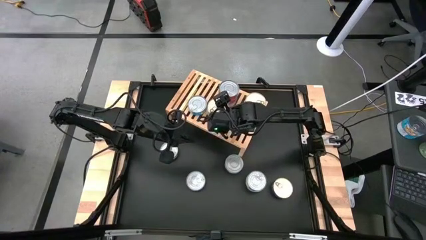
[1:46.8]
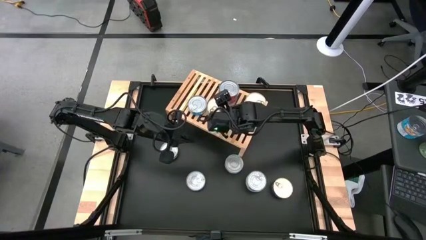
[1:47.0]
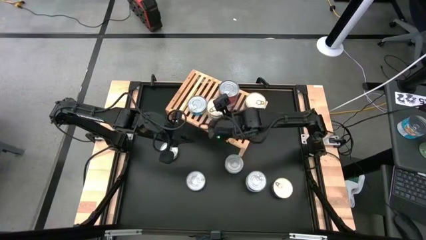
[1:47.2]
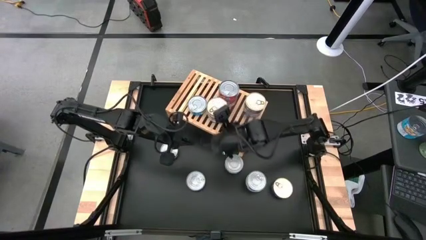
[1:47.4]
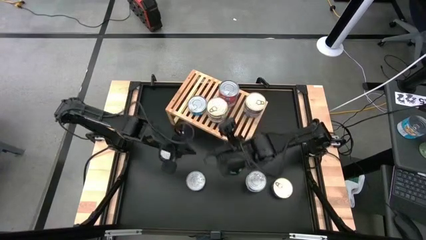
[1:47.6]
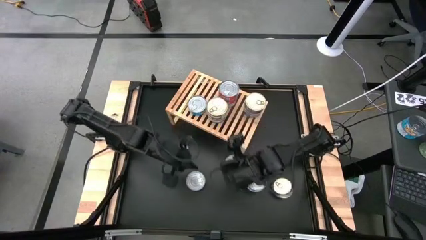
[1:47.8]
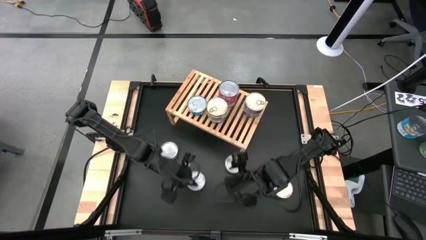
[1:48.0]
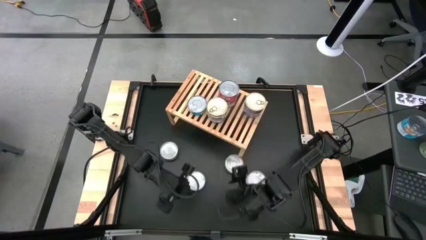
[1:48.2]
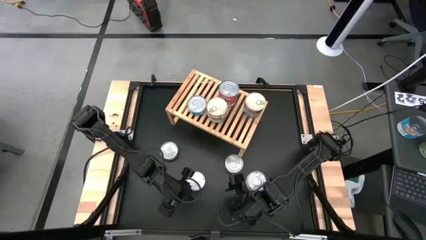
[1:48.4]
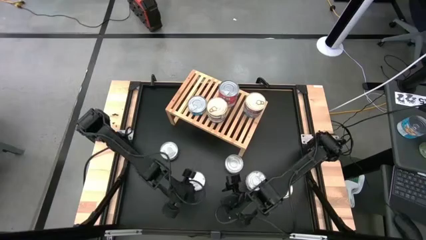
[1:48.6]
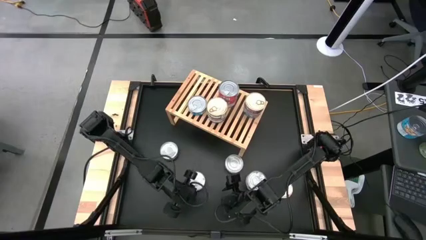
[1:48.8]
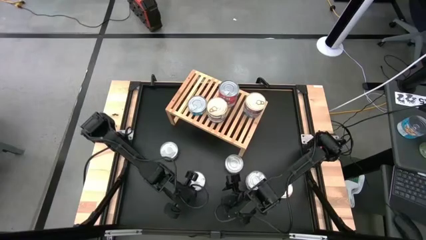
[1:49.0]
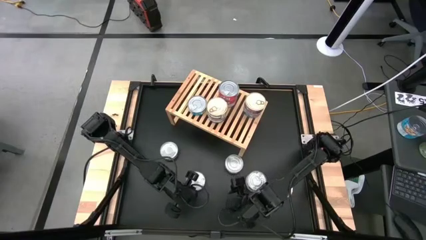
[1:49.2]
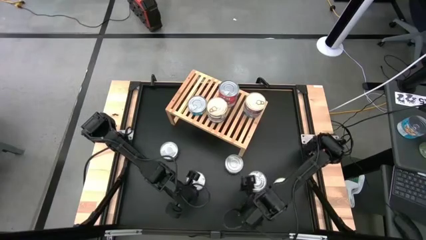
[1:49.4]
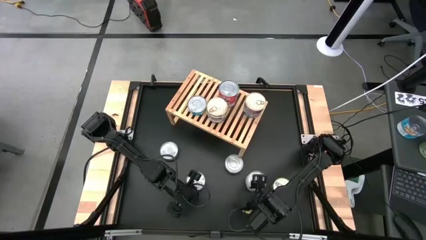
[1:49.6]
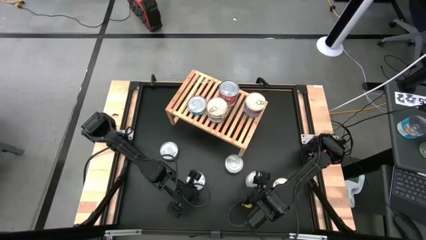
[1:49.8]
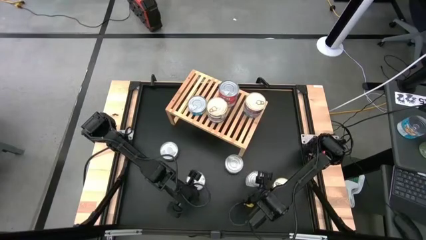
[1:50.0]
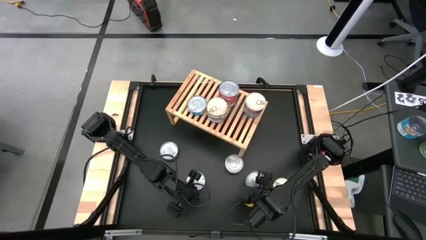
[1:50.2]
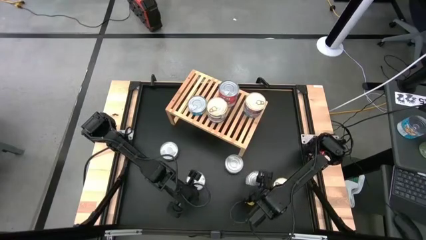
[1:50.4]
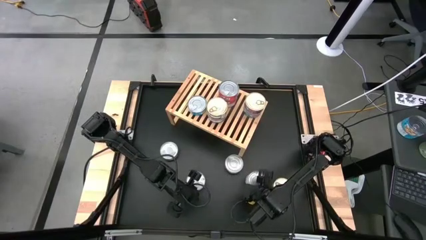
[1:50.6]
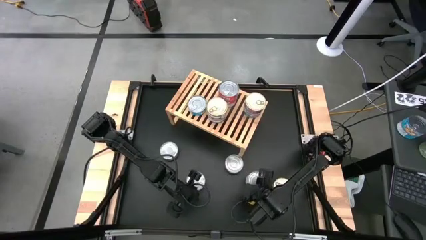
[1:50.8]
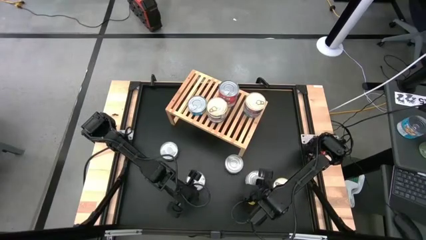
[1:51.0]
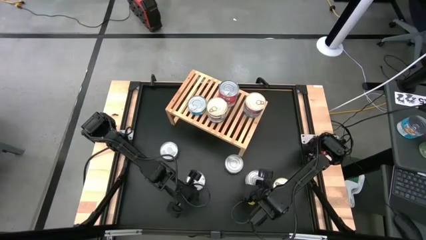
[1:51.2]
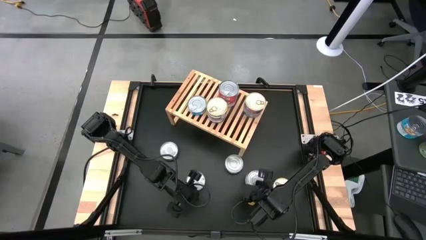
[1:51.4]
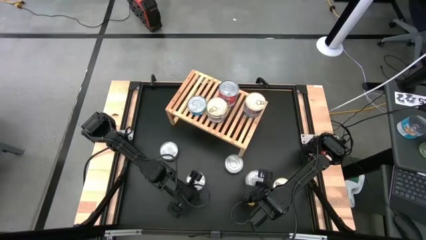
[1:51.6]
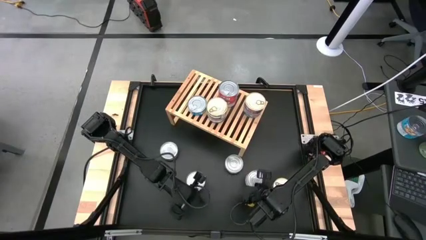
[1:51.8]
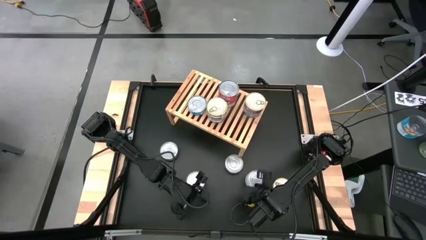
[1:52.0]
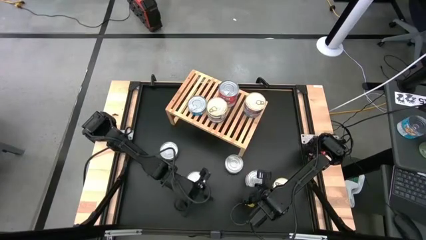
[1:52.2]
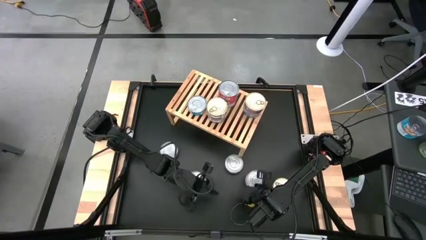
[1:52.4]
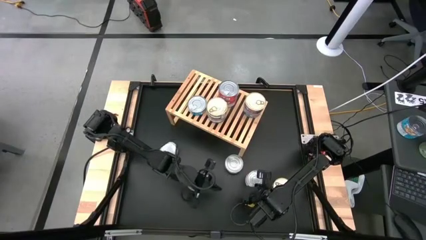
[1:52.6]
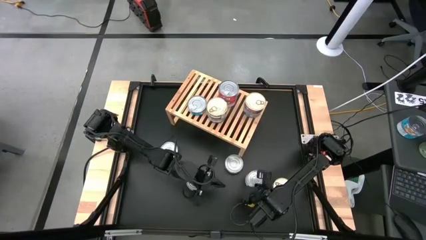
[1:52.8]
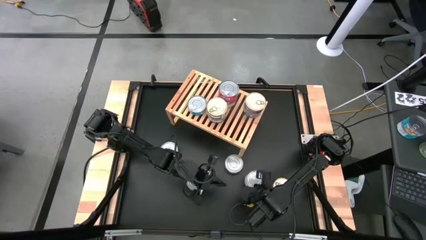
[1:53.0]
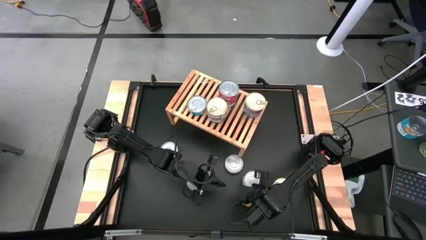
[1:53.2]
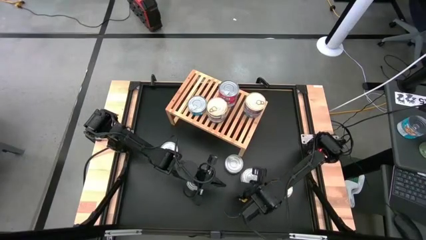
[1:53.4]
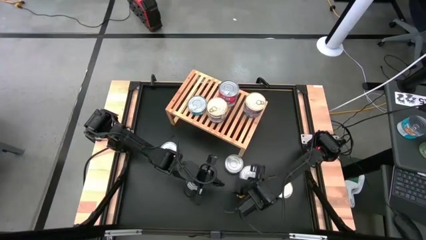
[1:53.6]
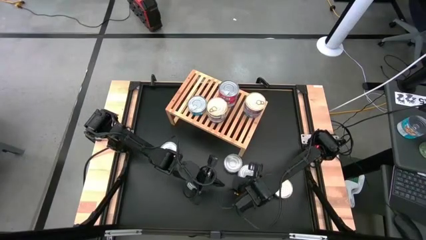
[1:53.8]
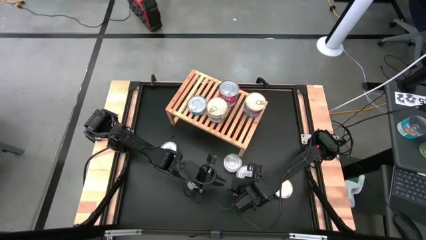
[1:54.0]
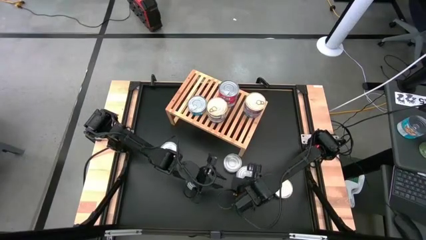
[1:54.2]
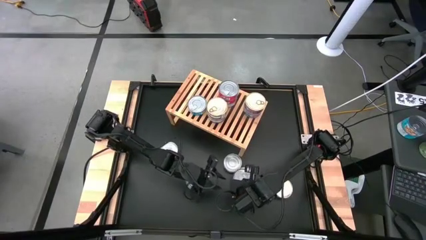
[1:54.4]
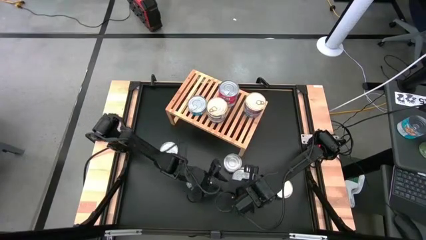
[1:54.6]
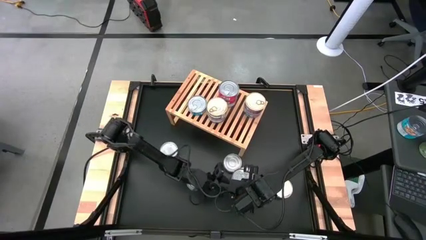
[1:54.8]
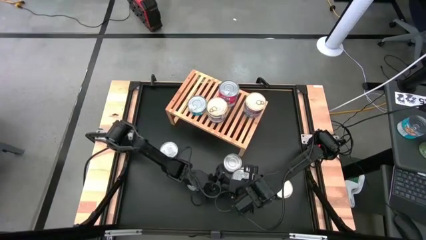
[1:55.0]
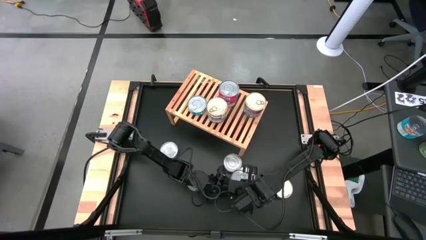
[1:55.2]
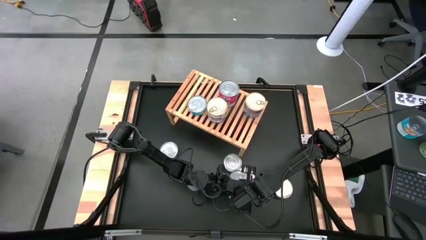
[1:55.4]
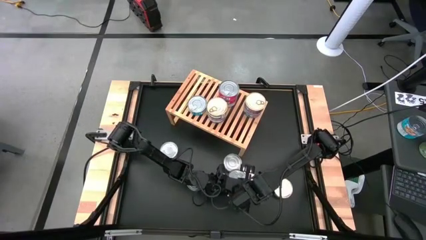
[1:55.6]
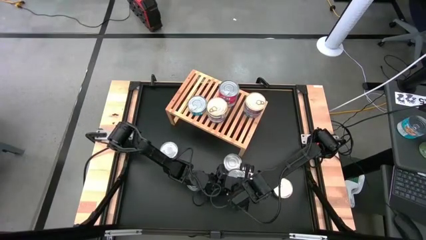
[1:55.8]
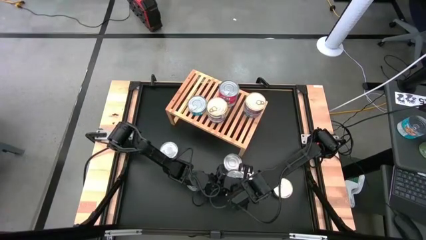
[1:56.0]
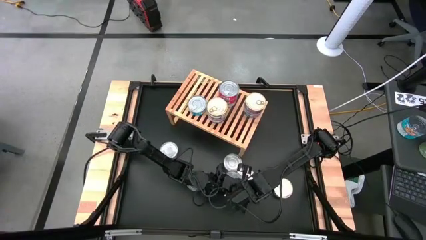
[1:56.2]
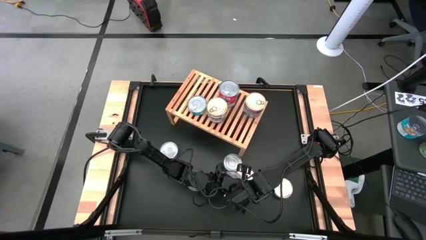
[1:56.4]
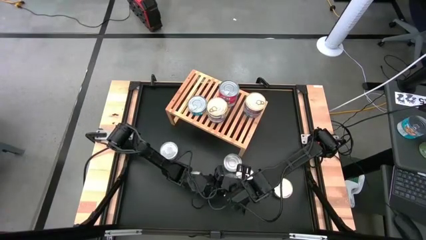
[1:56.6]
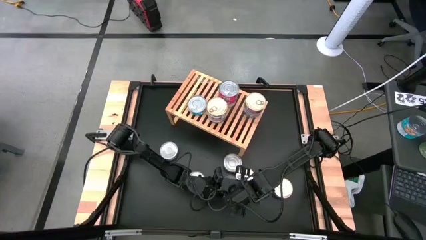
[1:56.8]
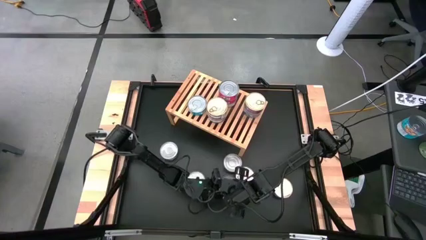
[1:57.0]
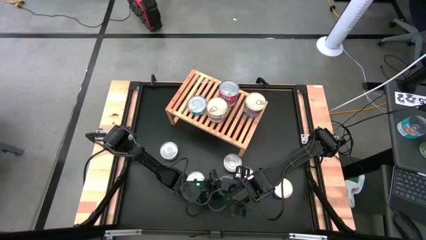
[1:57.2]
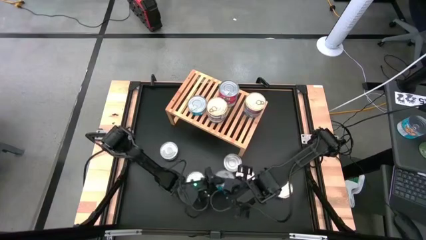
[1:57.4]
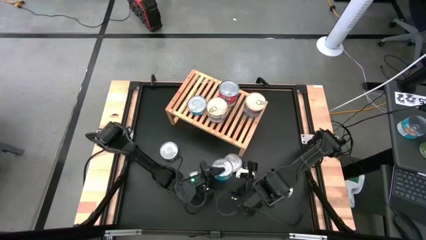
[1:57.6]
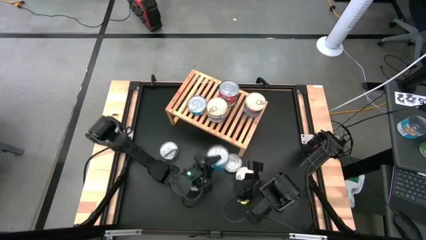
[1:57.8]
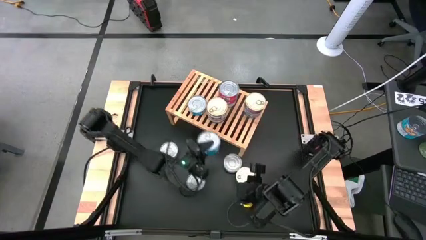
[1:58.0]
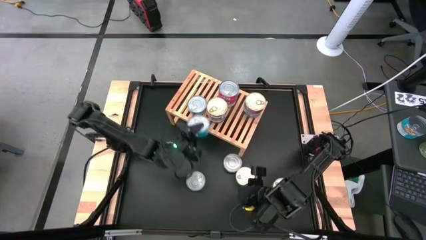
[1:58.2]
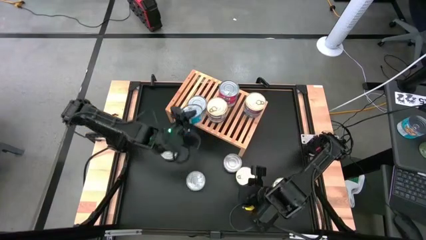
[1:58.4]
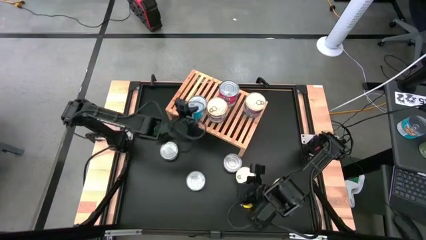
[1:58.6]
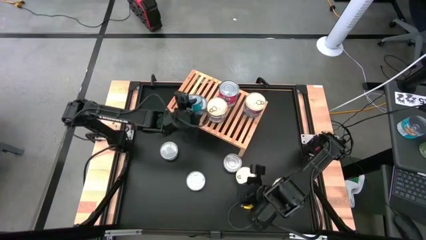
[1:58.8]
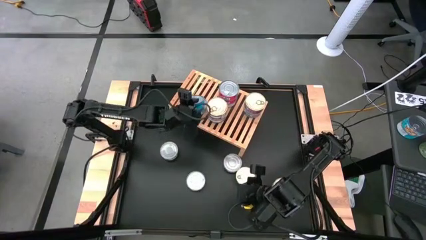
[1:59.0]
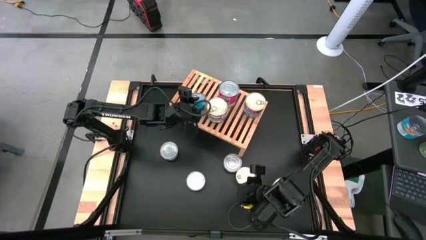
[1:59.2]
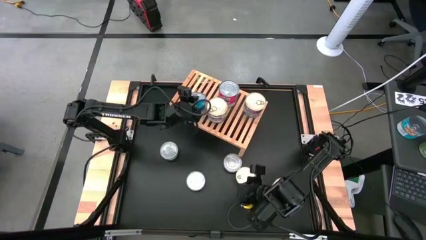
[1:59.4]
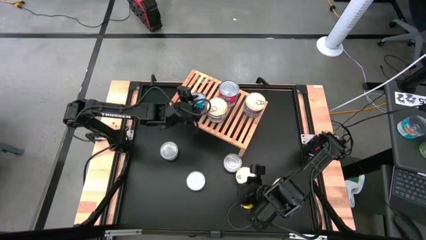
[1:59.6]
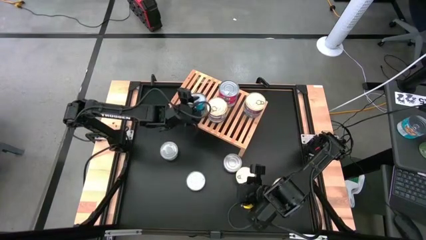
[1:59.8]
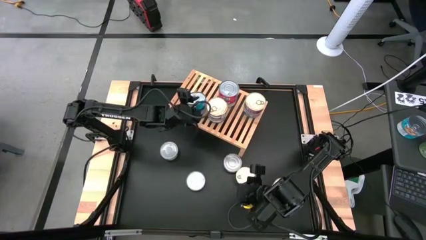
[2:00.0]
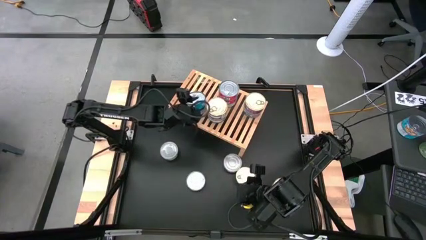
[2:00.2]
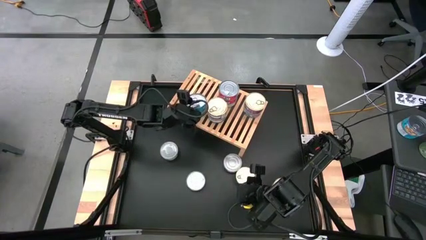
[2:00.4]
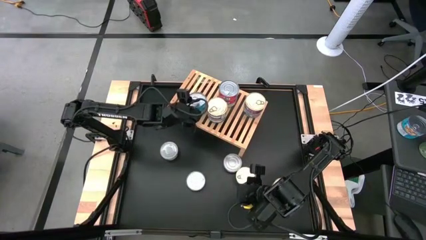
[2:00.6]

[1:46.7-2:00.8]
Task: Stack canned seafood by type on shelf
Stack the yellow and blue tuna can on top of the yellow and blue tuna can on the shelf

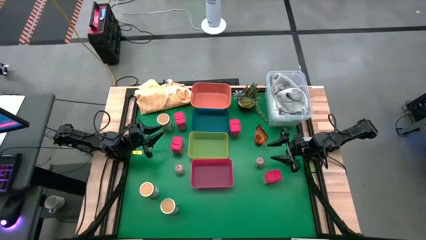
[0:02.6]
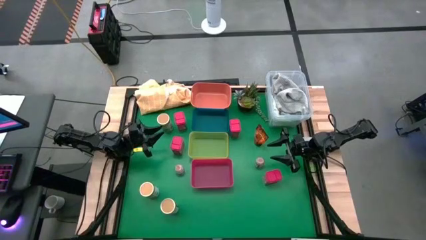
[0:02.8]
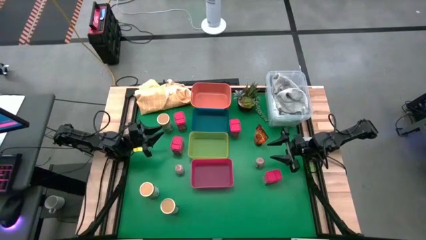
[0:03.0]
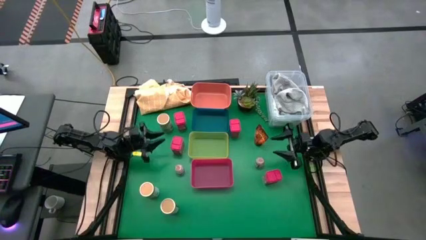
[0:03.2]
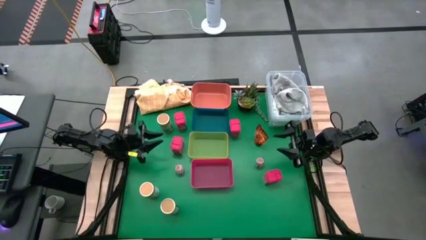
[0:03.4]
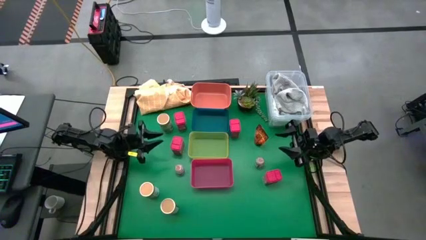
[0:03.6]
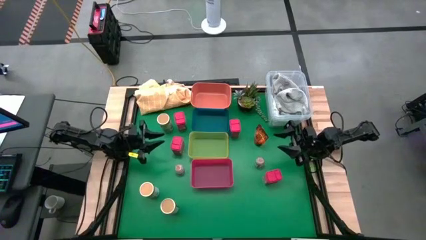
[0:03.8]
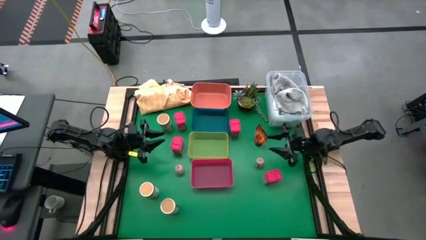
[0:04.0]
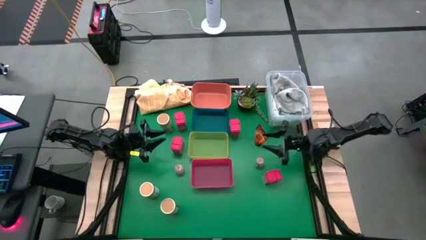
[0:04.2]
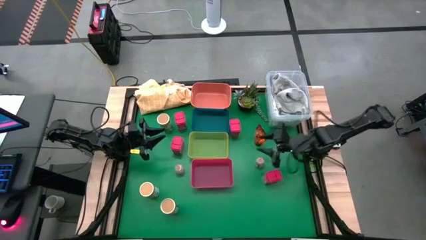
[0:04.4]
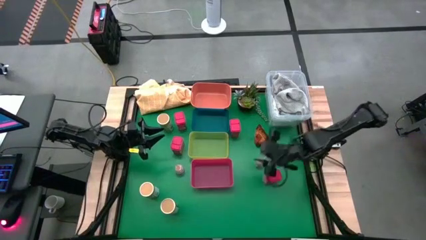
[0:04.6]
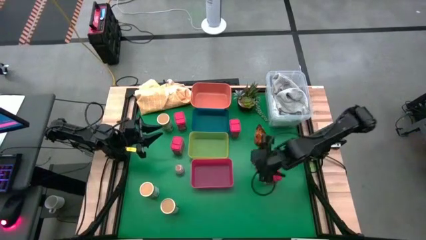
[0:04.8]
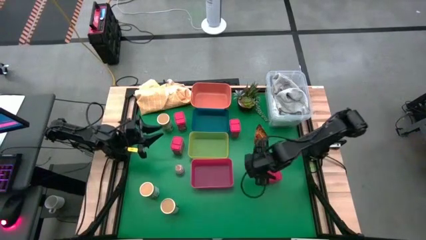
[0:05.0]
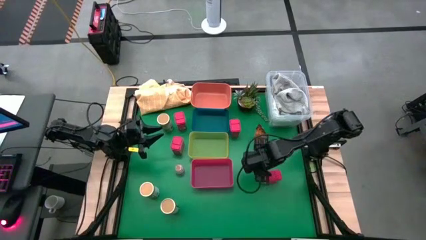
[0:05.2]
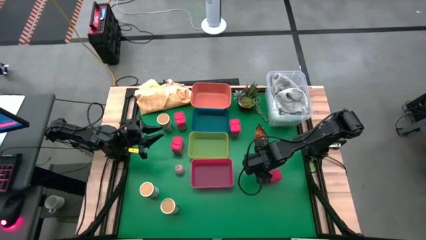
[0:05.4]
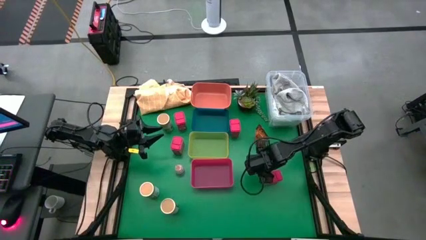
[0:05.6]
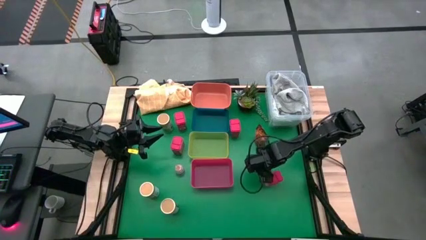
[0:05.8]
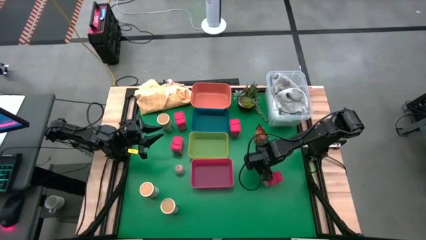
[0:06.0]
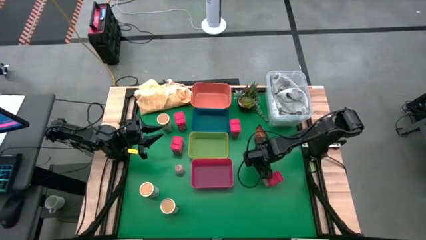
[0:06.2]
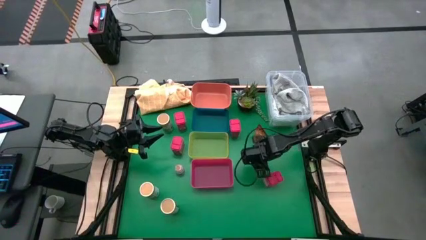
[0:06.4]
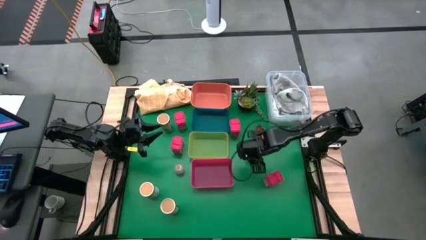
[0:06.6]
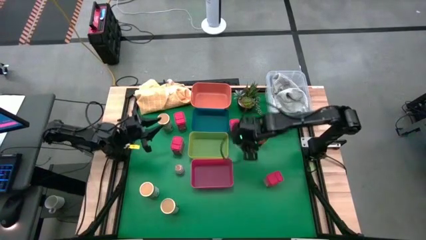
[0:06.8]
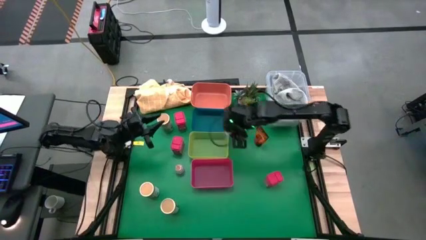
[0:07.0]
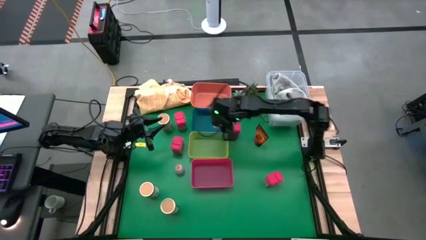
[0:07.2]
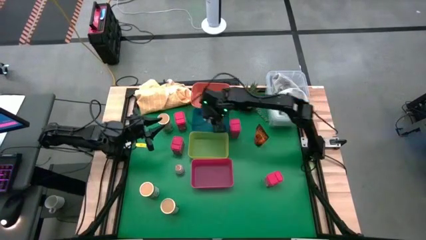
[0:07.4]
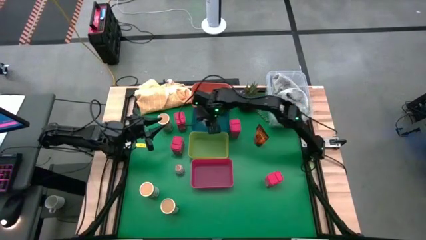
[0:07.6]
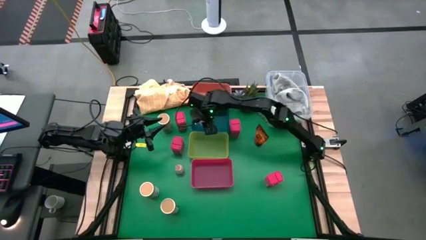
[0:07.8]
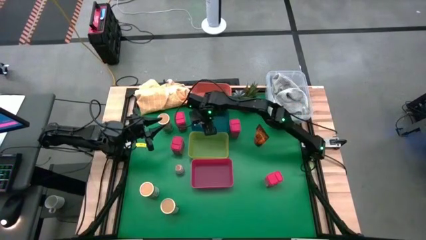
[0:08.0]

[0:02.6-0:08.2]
Task: Sort spices by type
Put the right brown seasoning bottle into the blue bin
